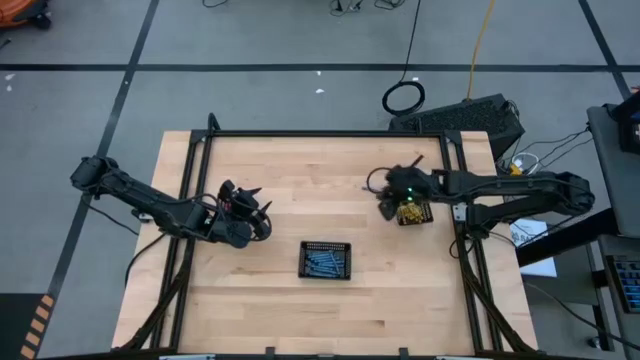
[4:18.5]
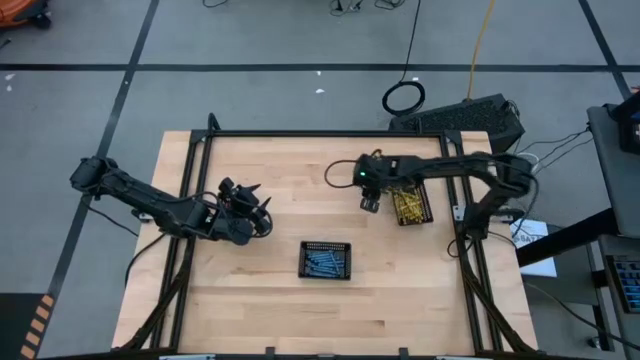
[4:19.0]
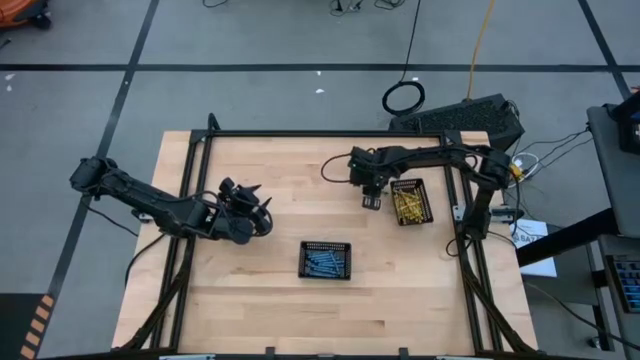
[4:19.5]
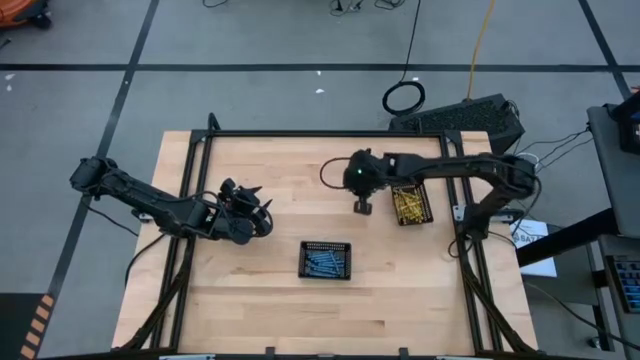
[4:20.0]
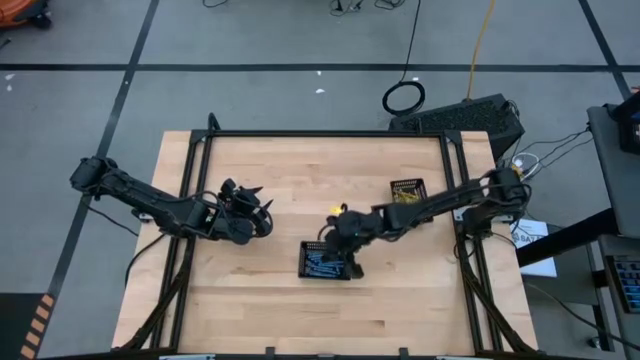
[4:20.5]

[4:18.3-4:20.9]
Task: Sort crayons
Put the blue crayon into the center black basket

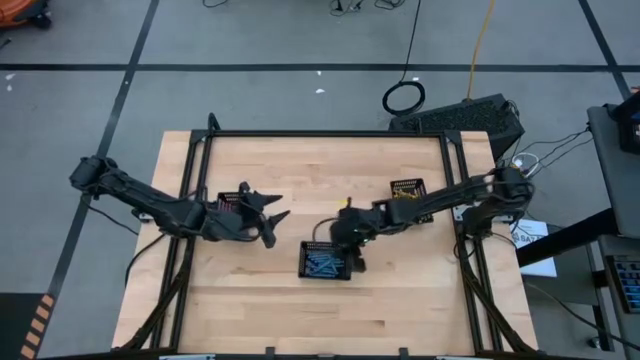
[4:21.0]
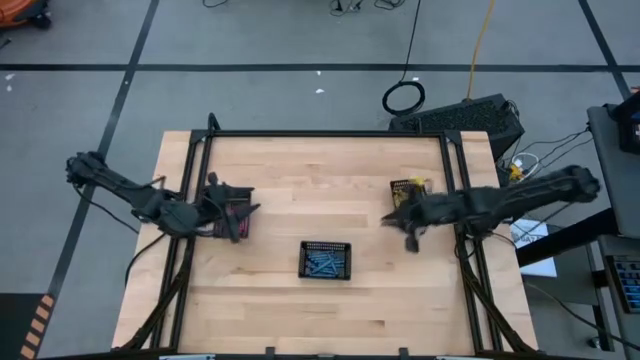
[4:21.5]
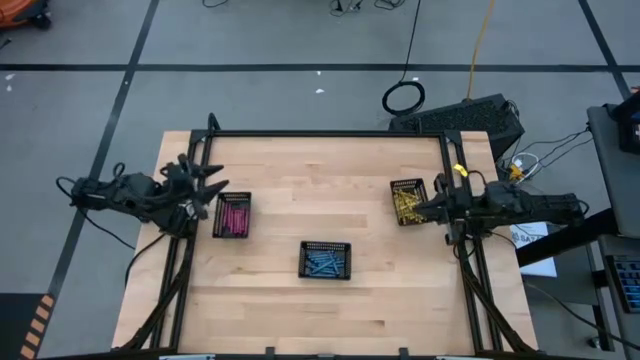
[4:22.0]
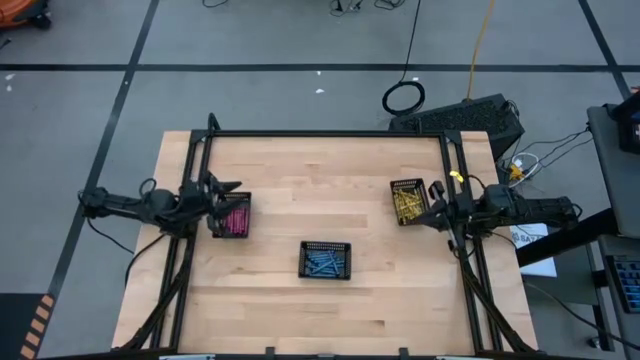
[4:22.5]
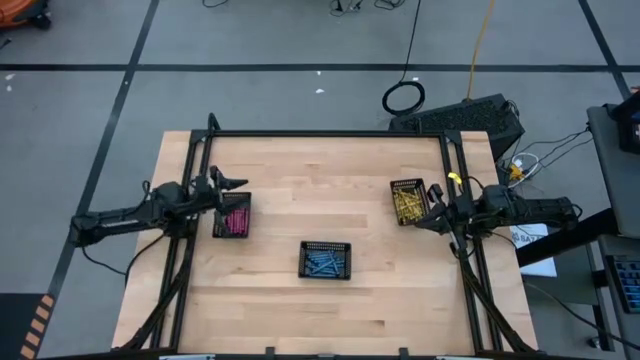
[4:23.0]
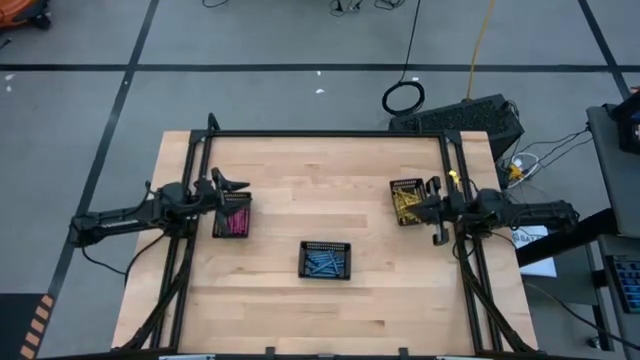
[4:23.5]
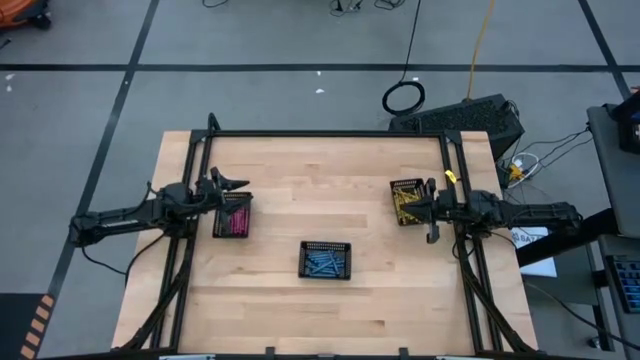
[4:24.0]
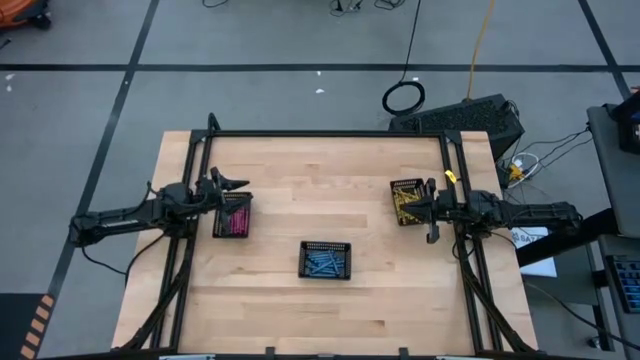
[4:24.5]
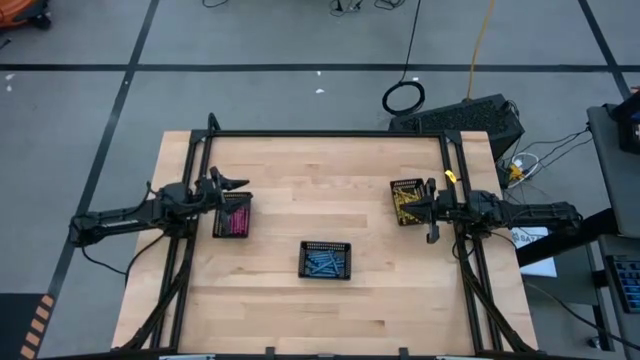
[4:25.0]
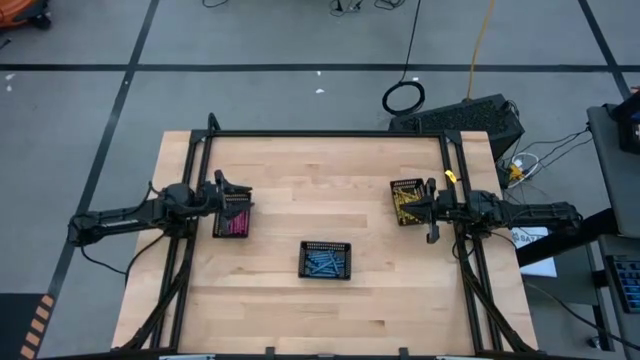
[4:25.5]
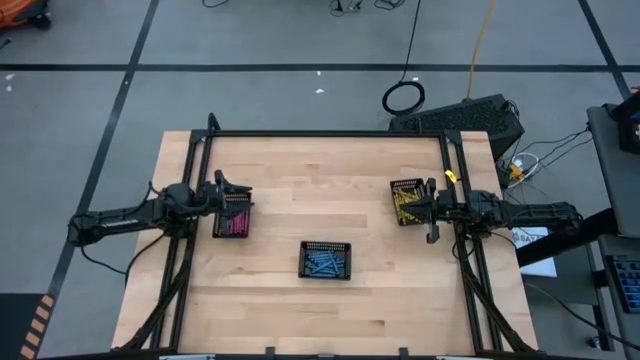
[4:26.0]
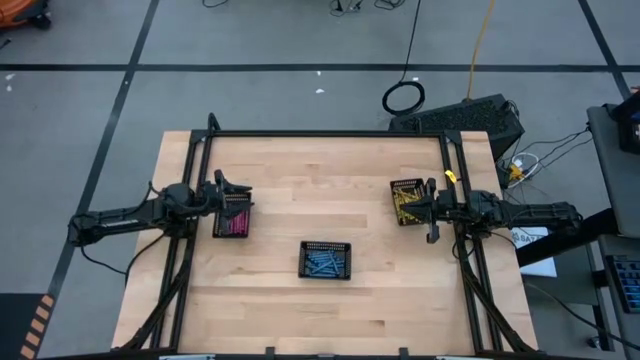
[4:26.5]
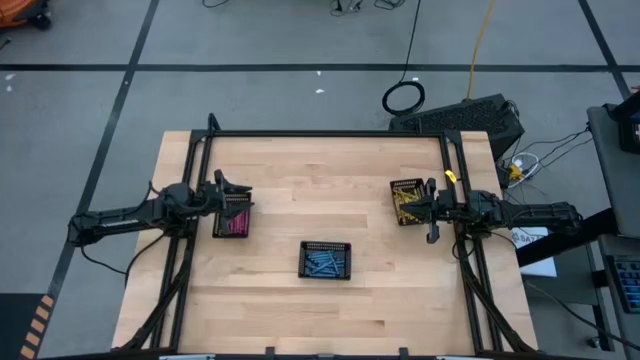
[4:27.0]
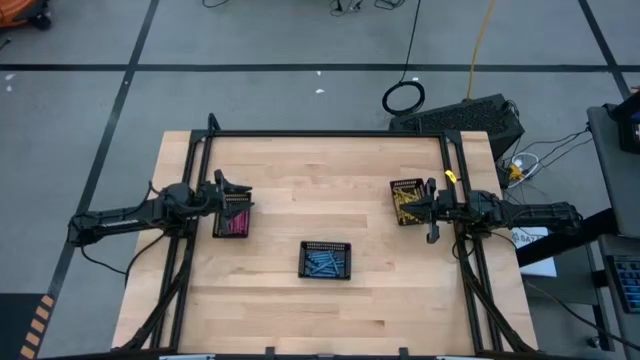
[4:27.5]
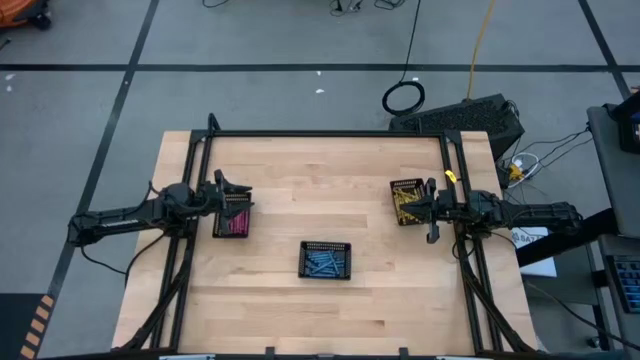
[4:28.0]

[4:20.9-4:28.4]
Return to Home Position

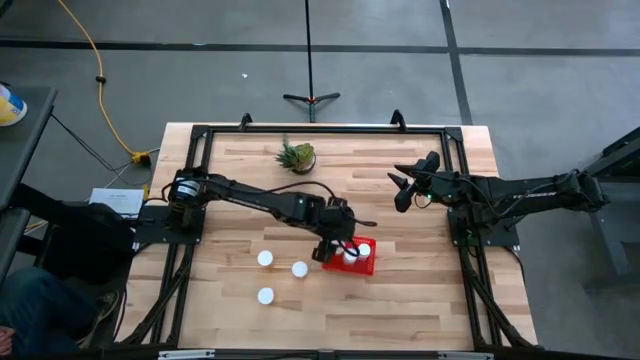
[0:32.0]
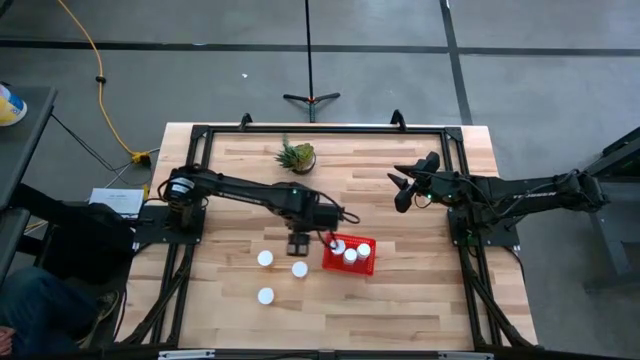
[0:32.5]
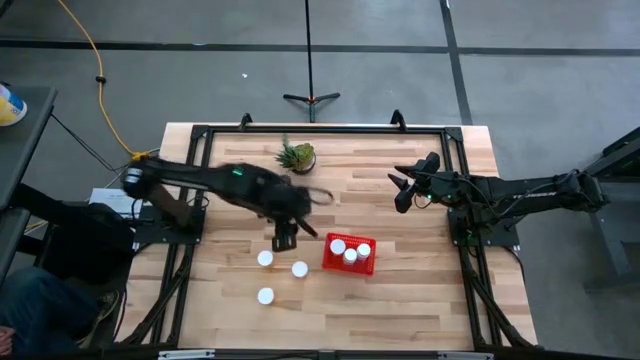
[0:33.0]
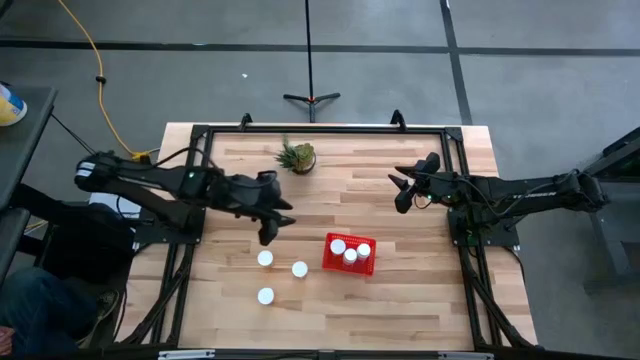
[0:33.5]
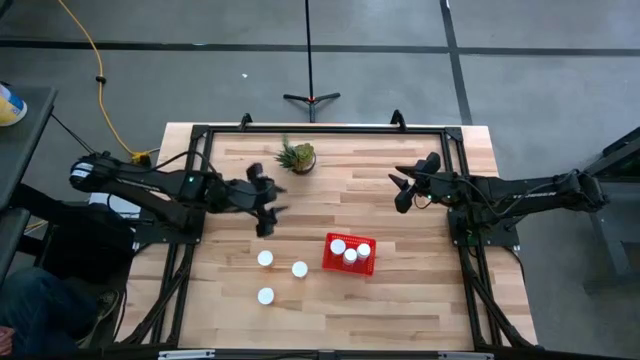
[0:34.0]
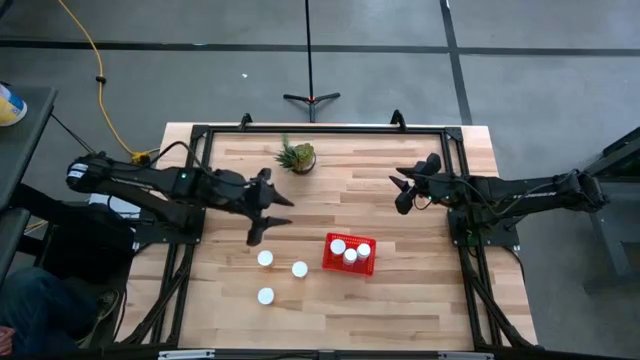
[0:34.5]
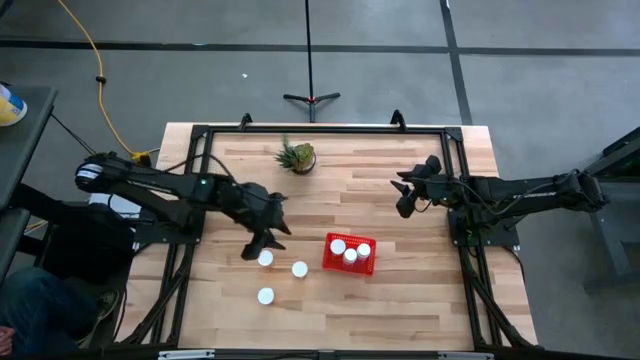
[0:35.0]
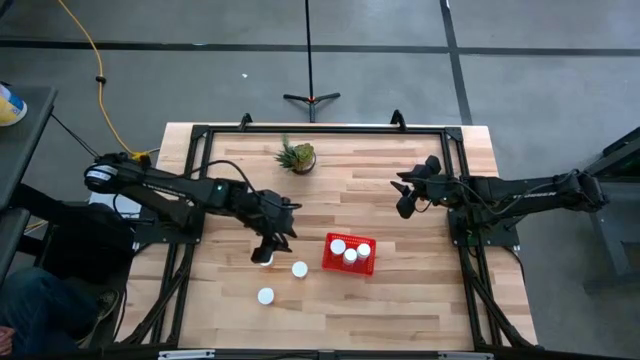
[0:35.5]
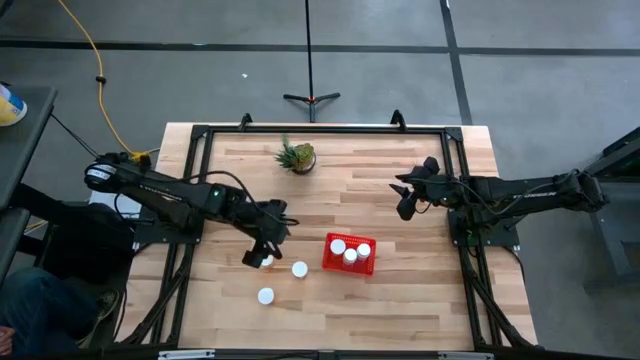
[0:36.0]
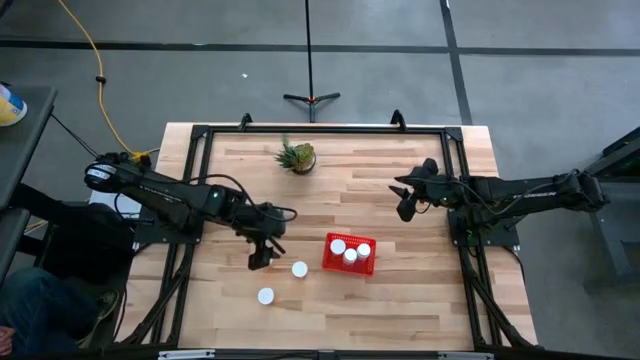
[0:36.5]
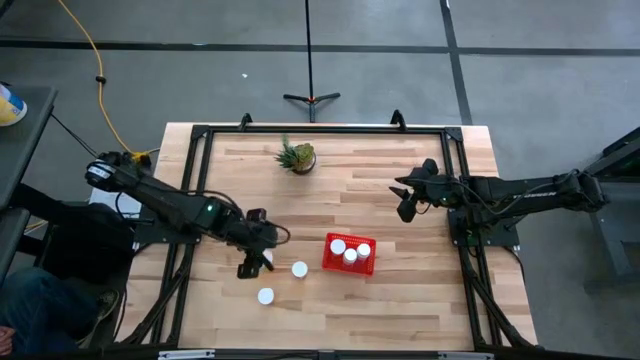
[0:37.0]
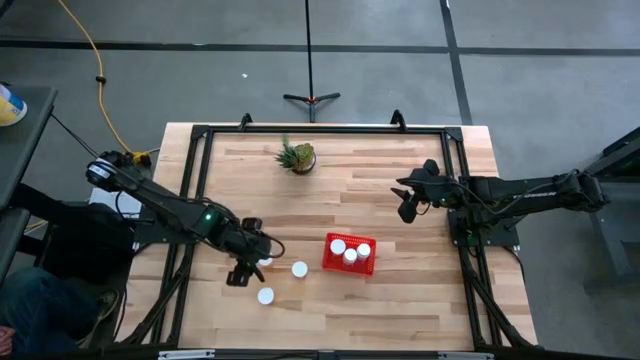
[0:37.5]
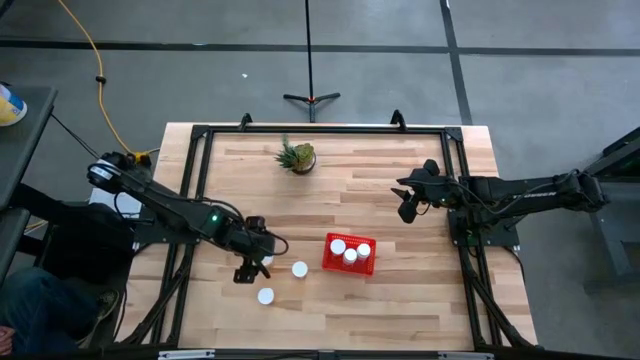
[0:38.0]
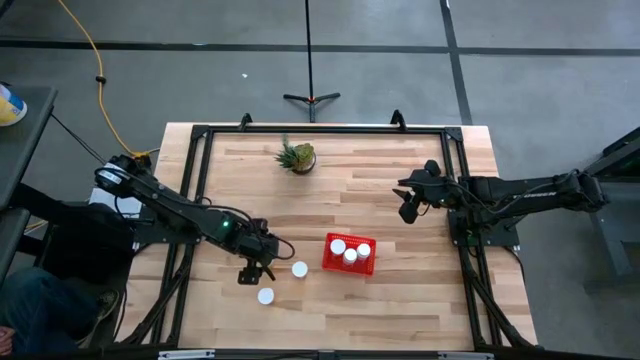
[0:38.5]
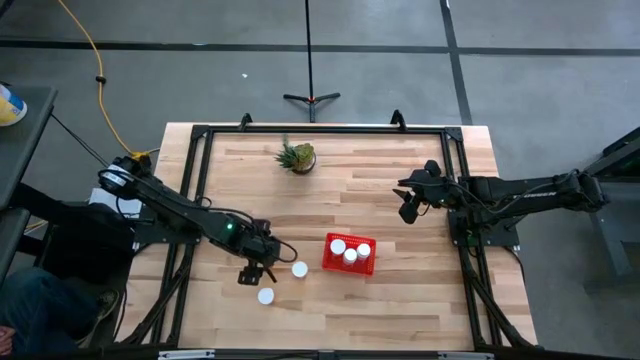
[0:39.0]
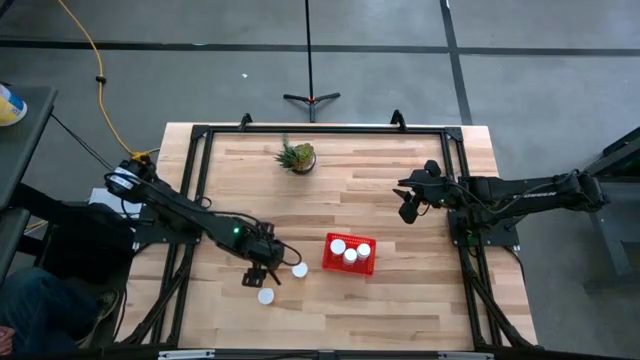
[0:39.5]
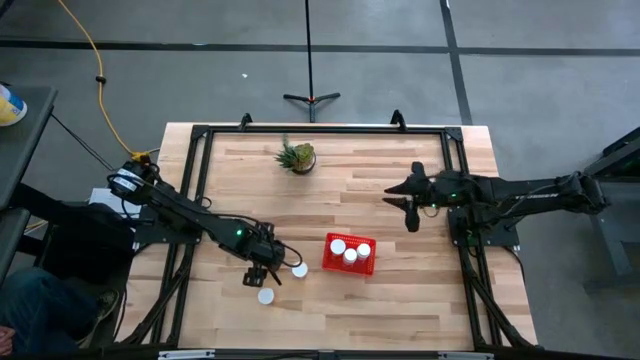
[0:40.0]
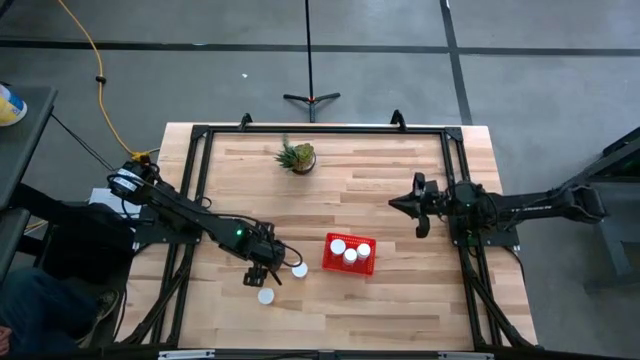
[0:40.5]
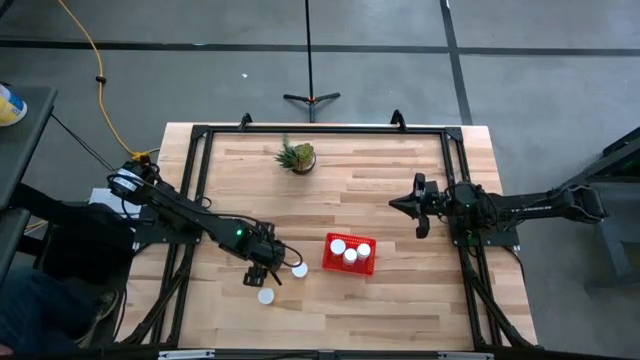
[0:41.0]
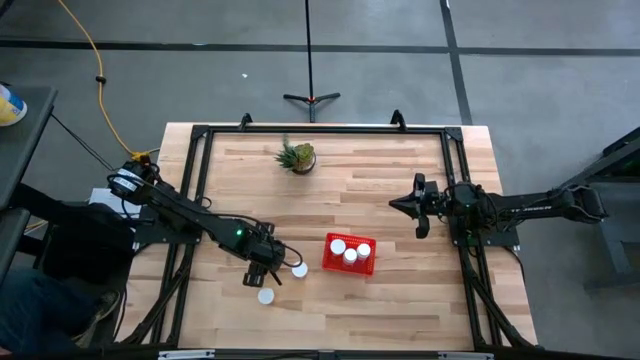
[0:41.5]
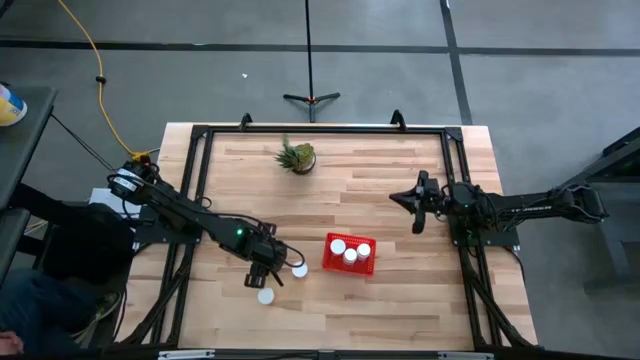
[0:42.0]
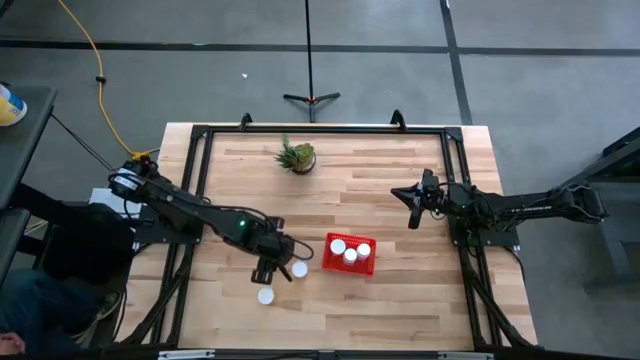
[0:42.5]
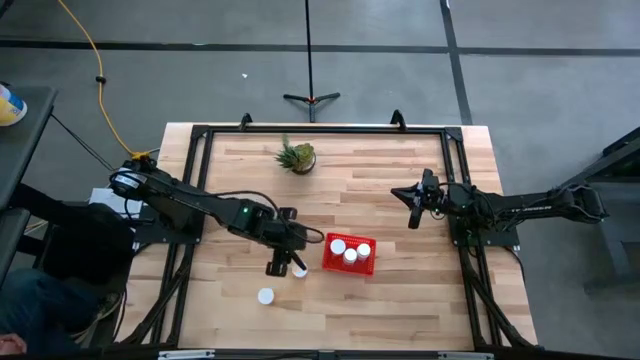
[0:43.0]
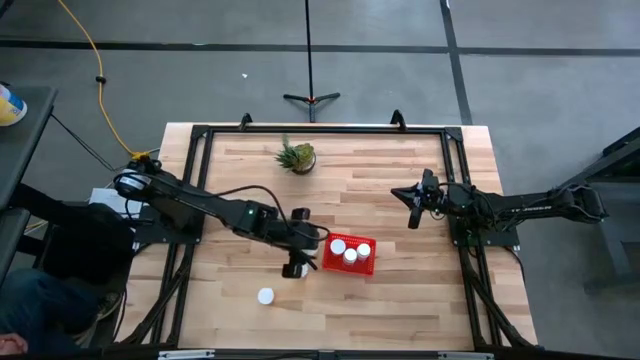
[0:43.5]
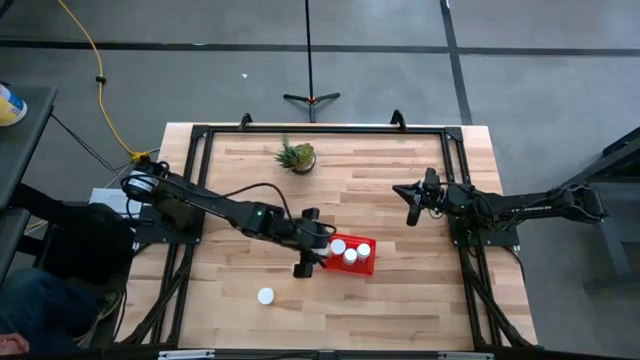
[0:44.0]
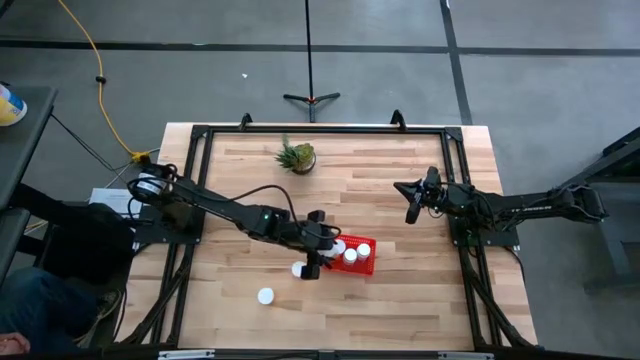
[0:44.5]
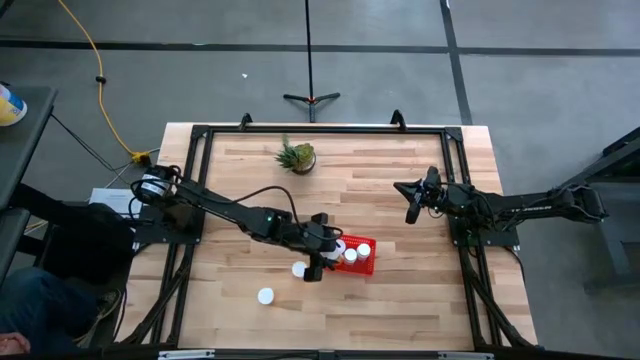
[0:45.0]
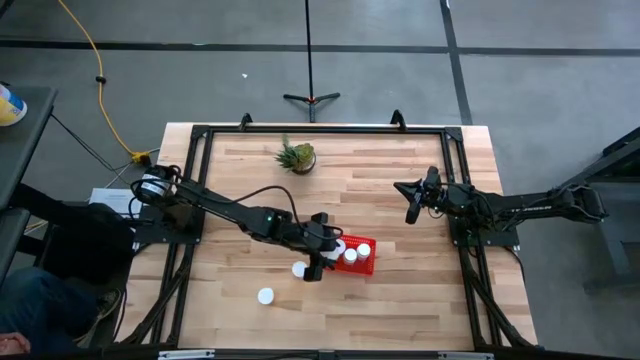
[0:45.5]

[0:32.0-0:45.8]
Task: Pick and place pill bottles into a basket
Put the orange pill bottle into the red bin
